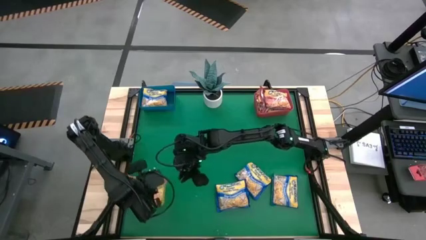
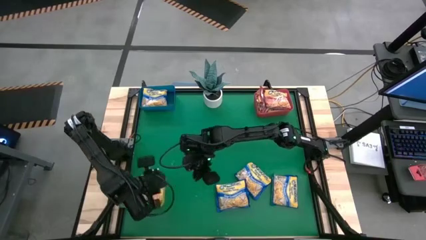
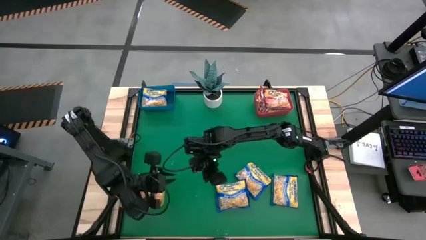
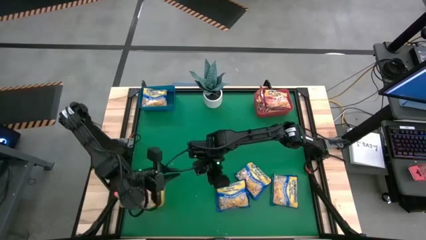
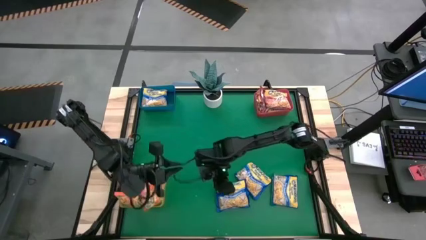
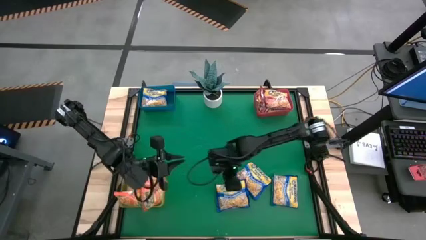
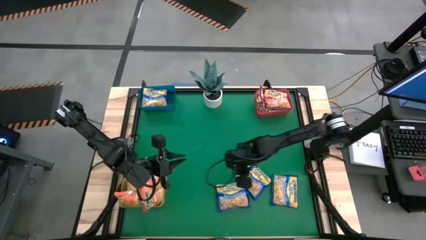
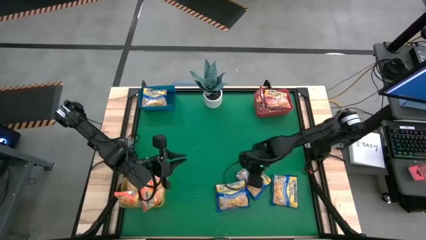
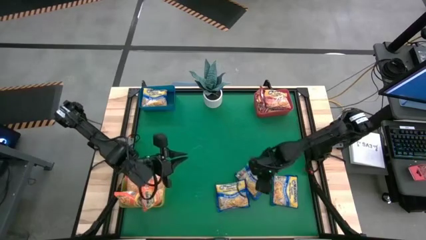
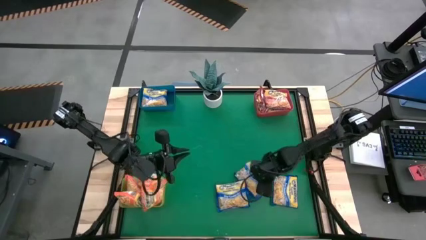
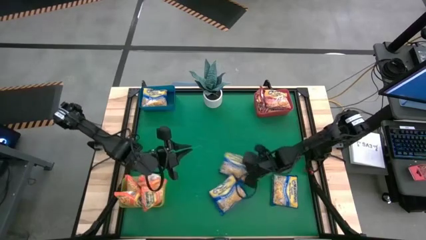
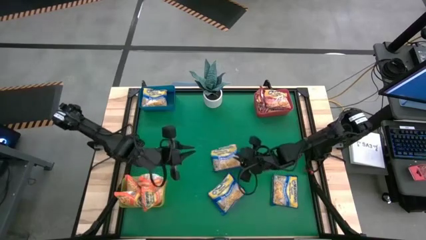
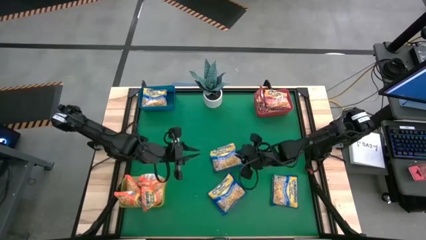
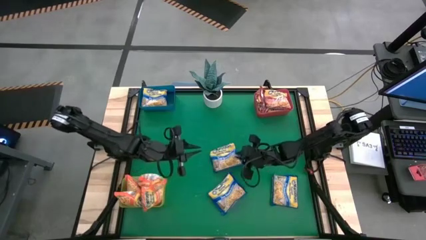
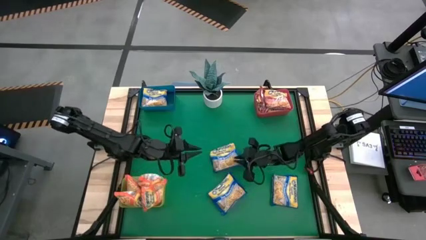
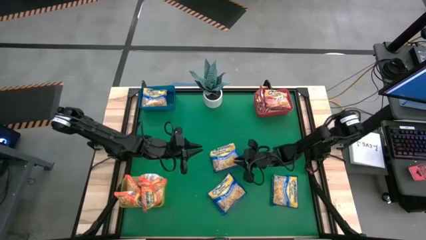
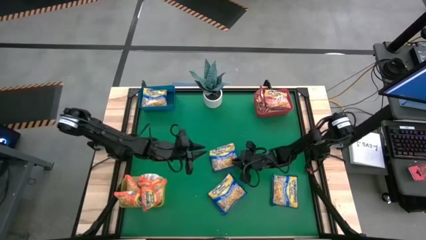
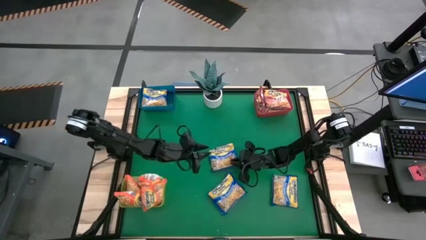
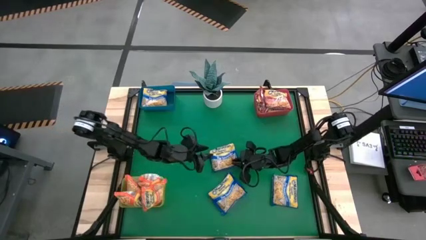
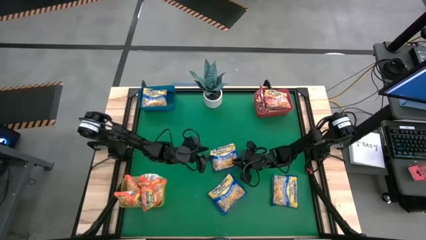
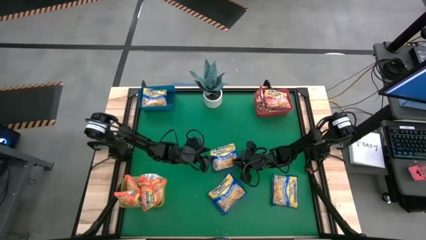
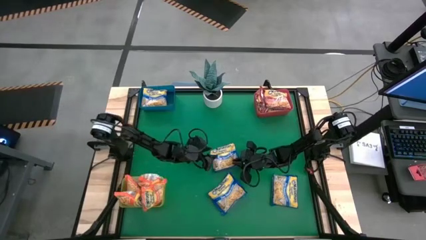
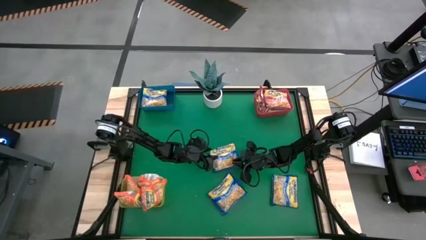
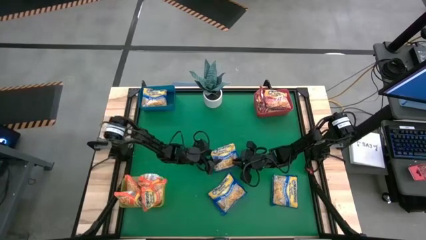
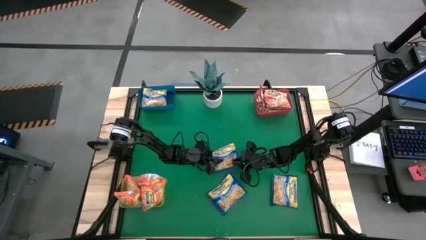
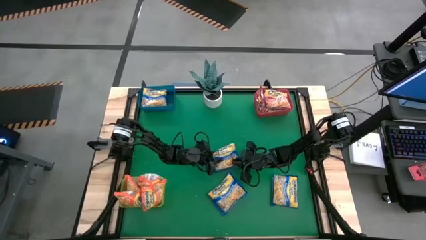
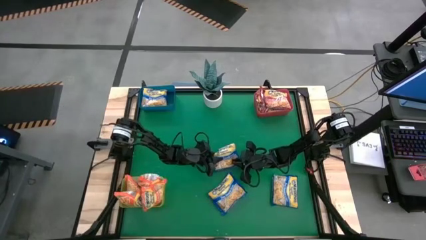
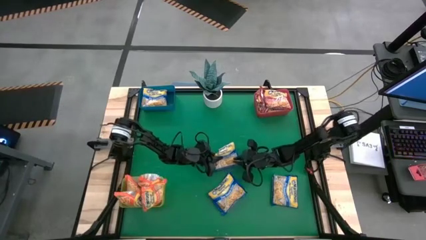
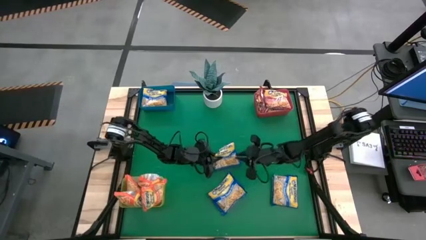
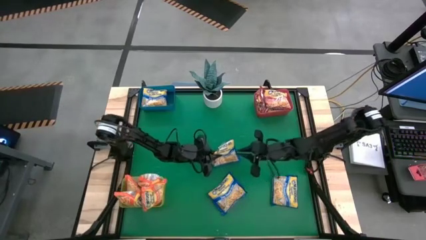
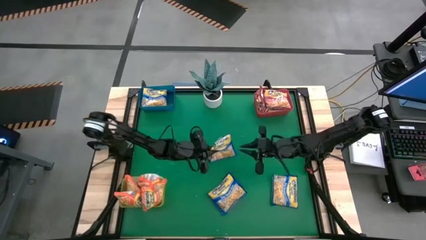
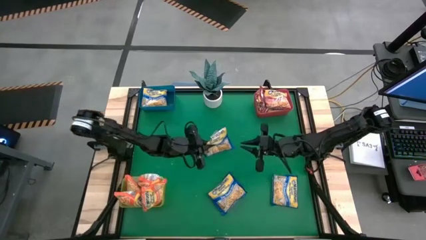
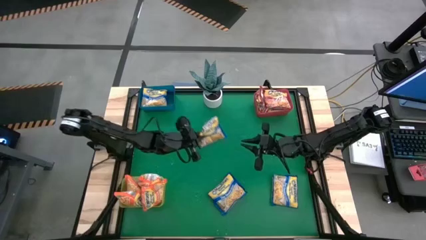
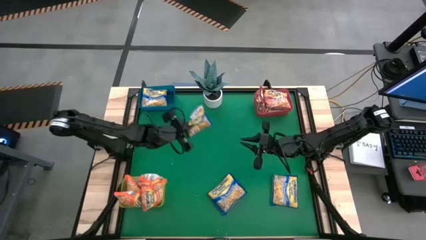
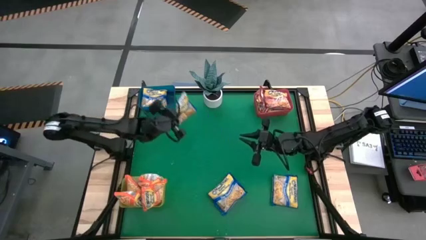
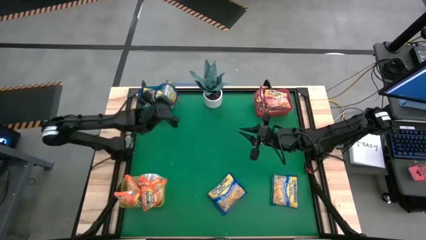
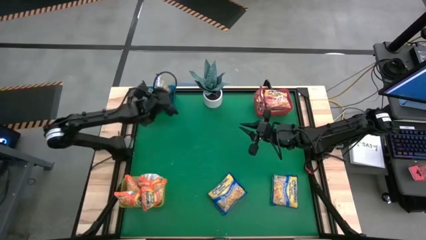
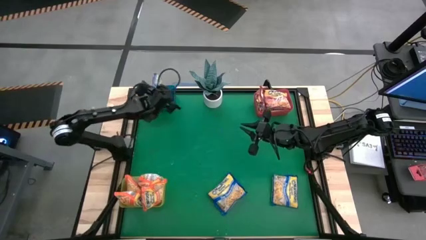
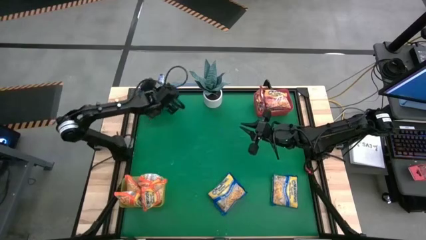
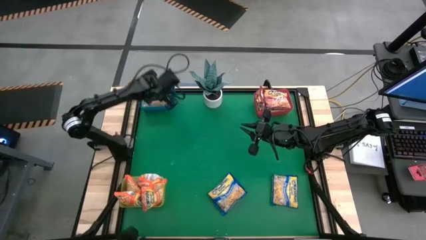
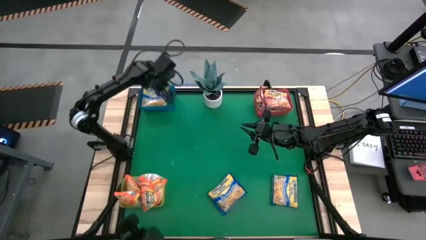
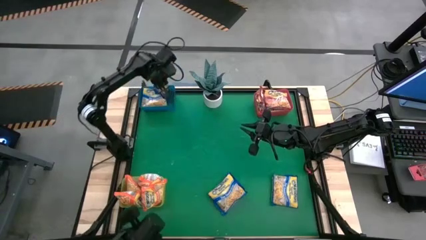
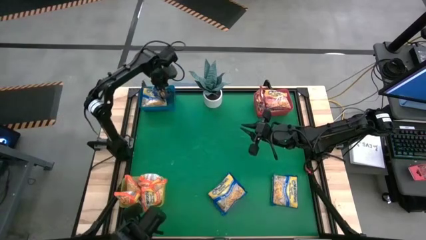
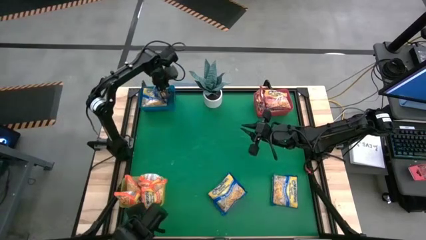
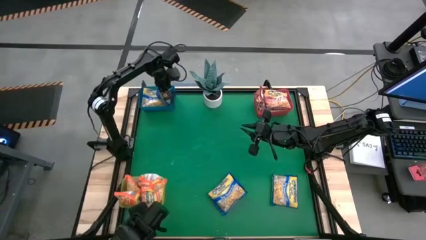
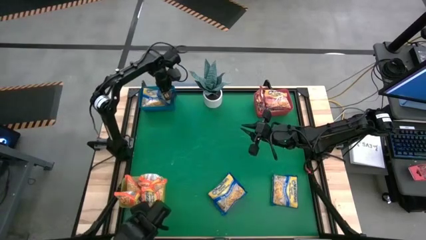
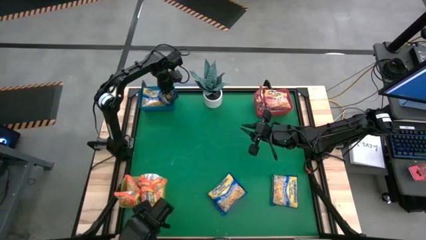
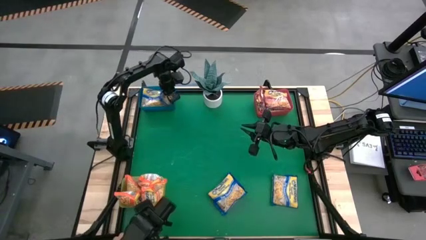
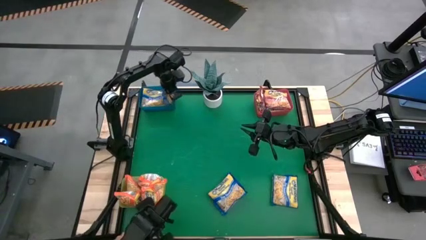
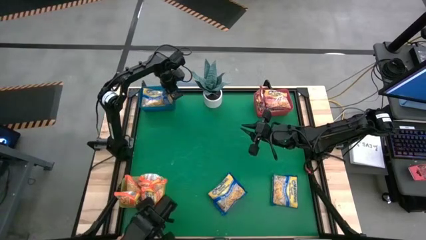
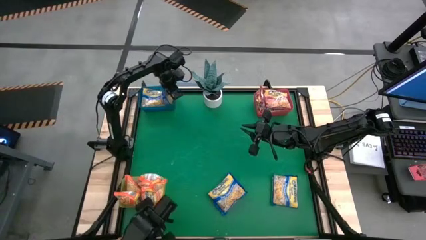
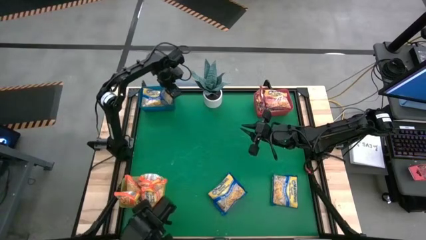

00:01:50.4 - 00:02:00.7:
Task: Sort Maruchan noodles
Put the blue noodle pack into the blue bin
